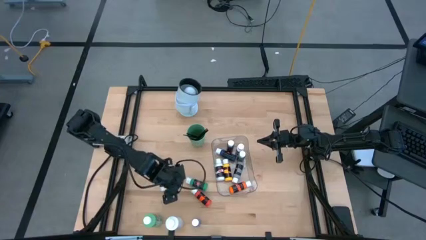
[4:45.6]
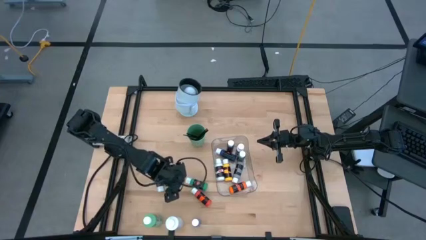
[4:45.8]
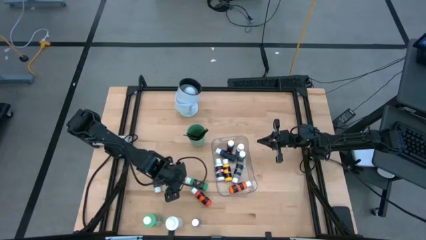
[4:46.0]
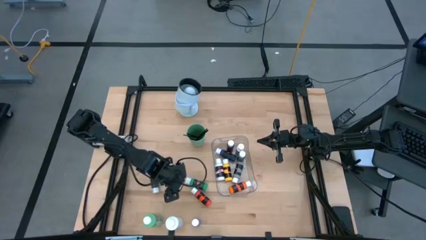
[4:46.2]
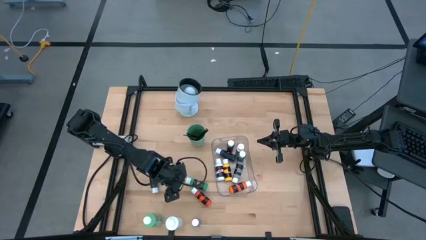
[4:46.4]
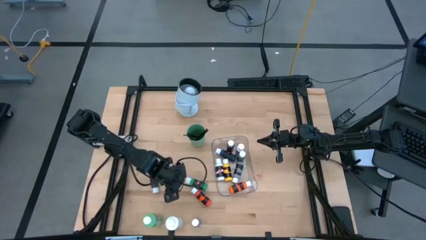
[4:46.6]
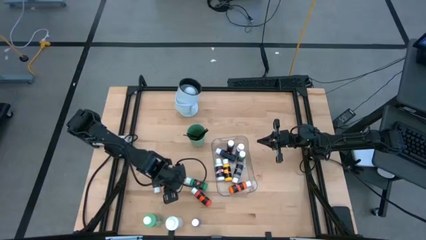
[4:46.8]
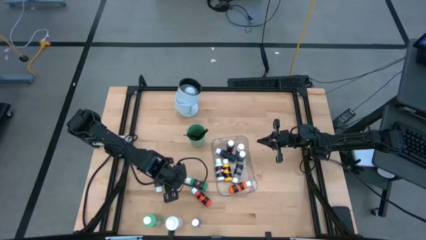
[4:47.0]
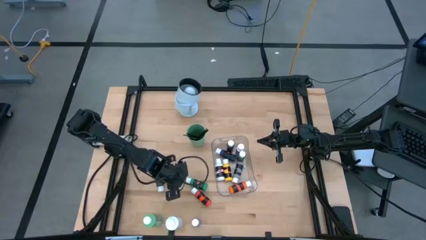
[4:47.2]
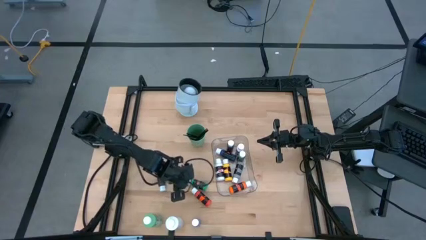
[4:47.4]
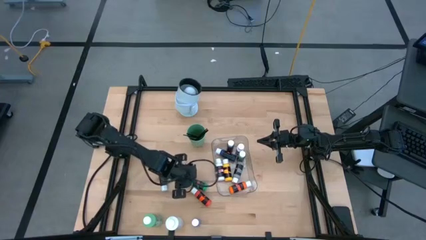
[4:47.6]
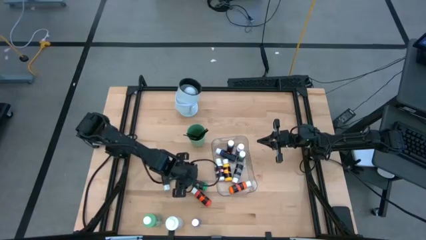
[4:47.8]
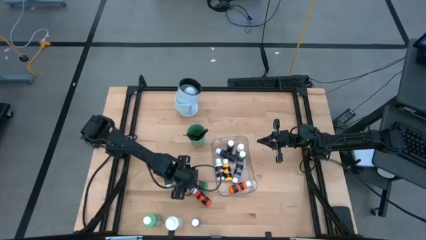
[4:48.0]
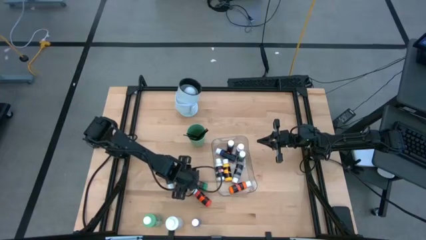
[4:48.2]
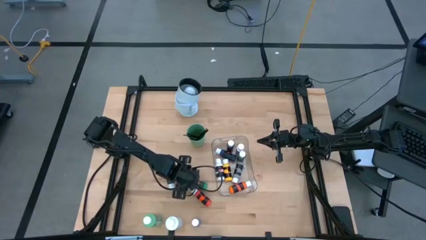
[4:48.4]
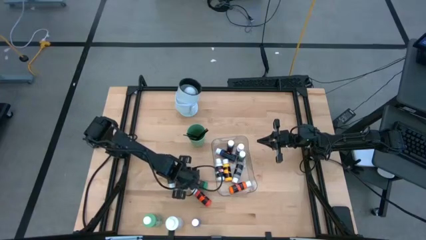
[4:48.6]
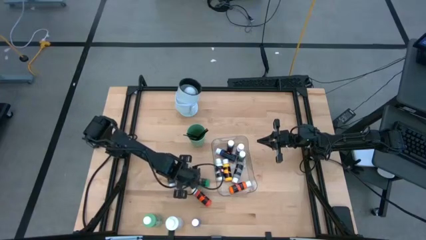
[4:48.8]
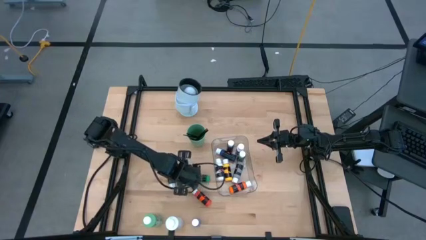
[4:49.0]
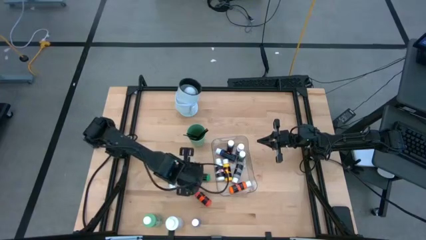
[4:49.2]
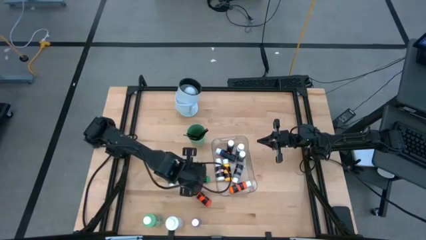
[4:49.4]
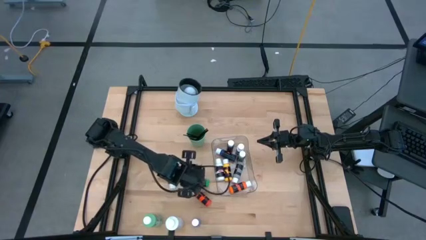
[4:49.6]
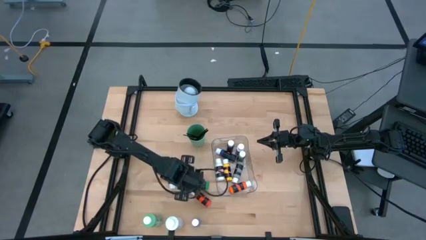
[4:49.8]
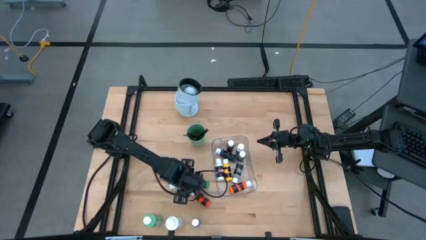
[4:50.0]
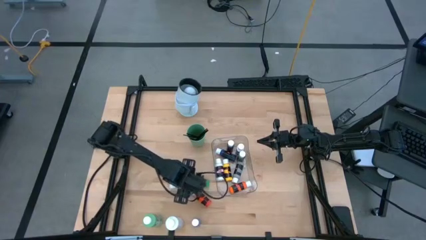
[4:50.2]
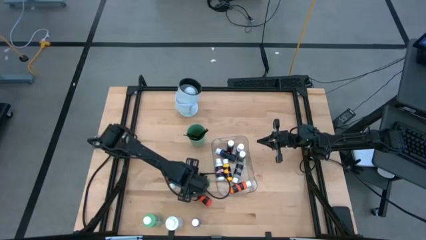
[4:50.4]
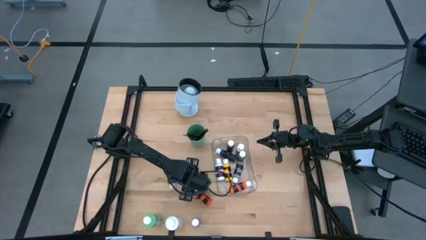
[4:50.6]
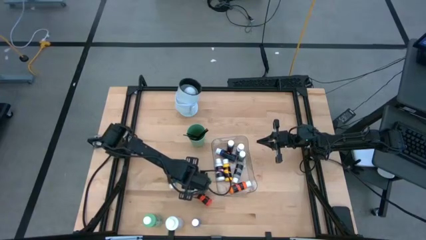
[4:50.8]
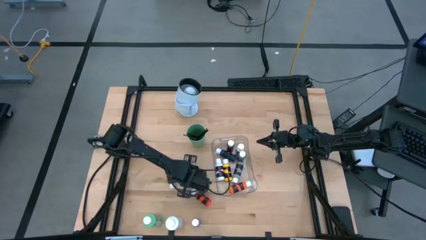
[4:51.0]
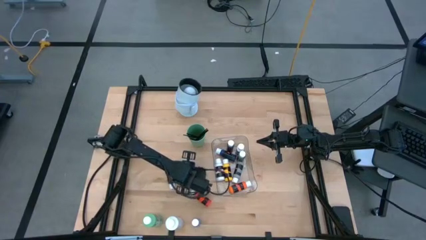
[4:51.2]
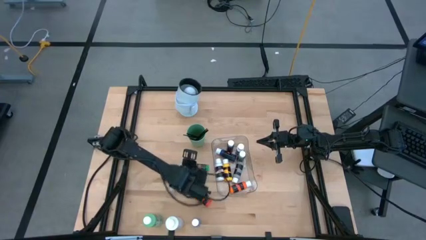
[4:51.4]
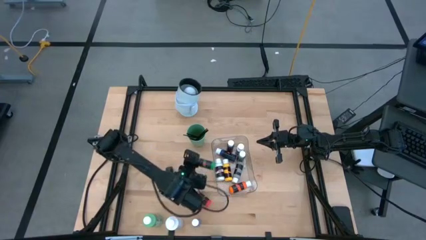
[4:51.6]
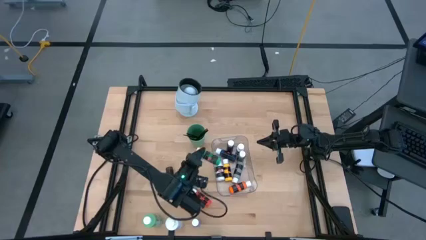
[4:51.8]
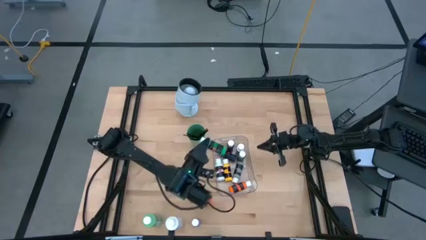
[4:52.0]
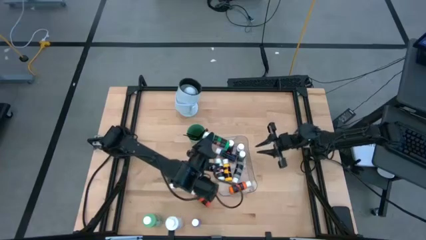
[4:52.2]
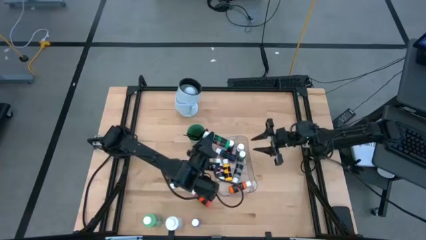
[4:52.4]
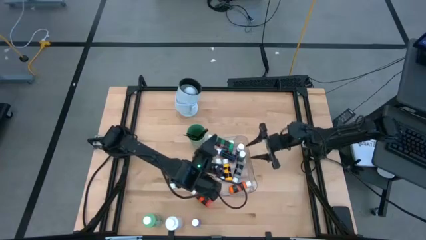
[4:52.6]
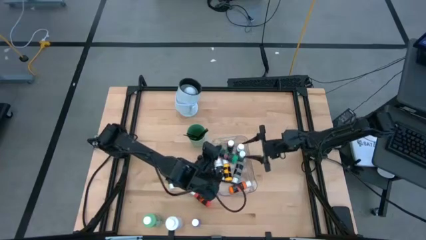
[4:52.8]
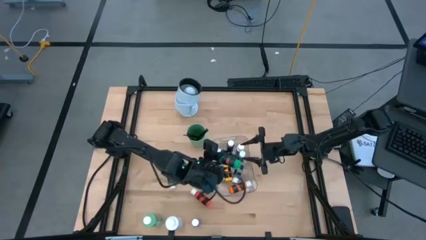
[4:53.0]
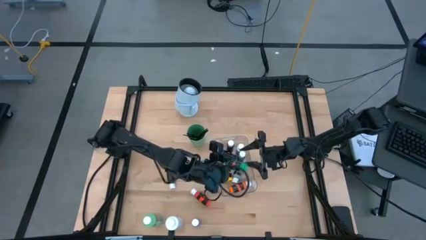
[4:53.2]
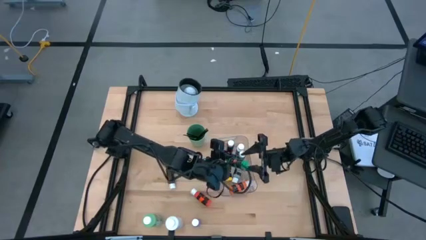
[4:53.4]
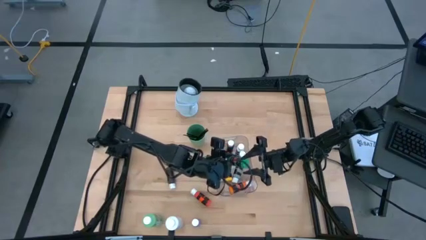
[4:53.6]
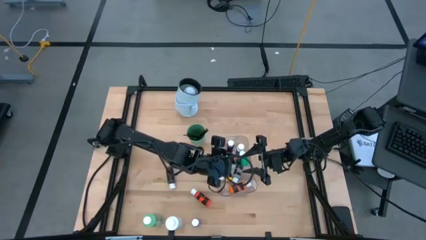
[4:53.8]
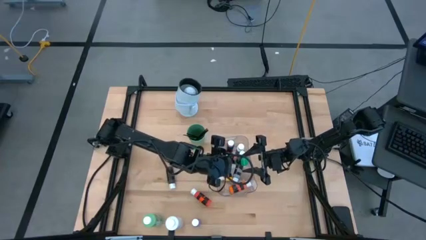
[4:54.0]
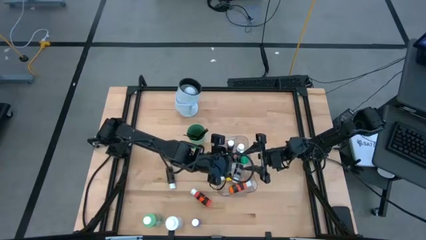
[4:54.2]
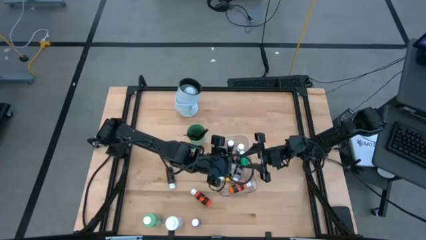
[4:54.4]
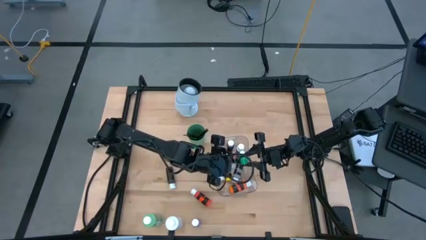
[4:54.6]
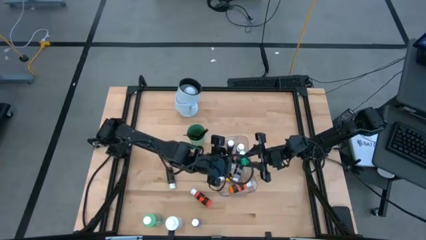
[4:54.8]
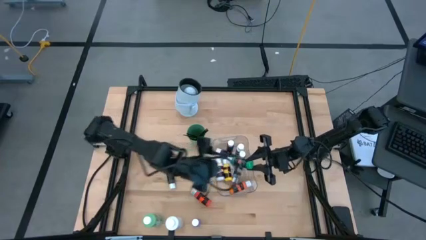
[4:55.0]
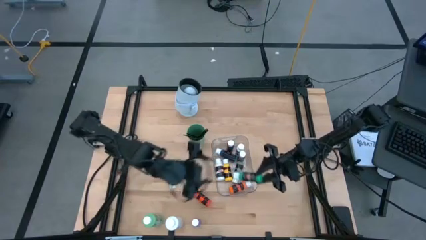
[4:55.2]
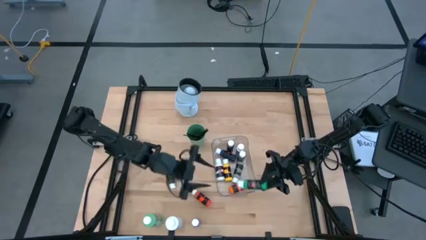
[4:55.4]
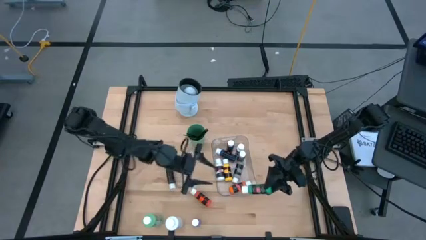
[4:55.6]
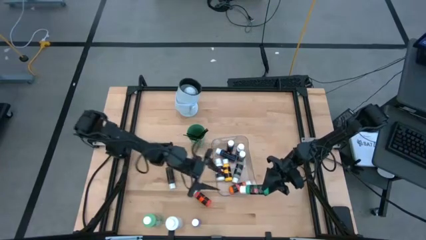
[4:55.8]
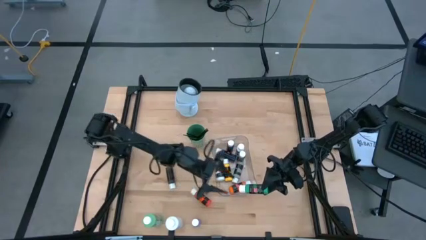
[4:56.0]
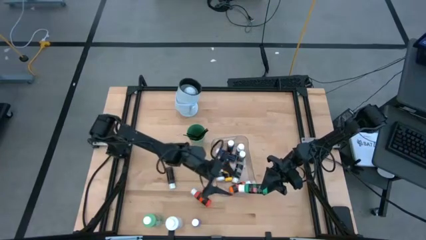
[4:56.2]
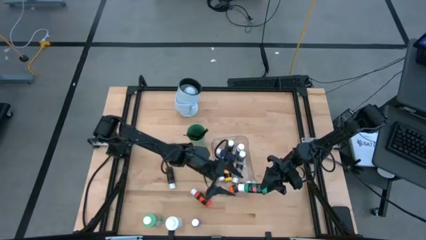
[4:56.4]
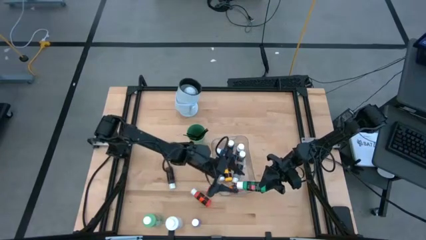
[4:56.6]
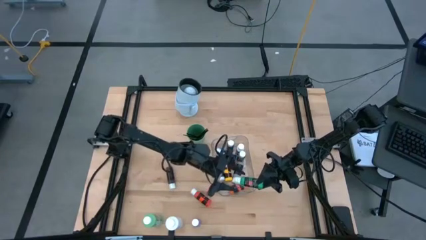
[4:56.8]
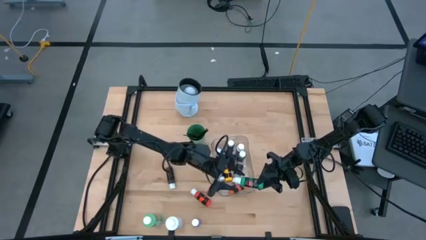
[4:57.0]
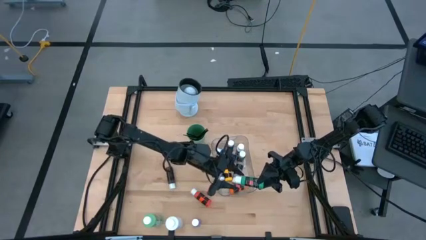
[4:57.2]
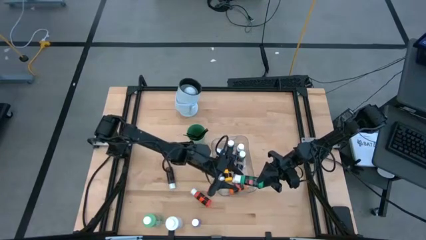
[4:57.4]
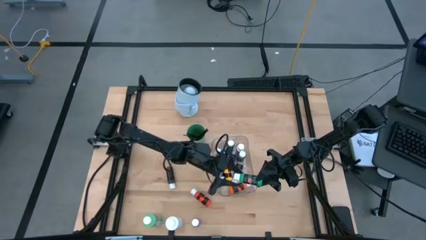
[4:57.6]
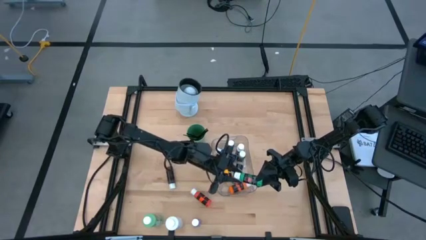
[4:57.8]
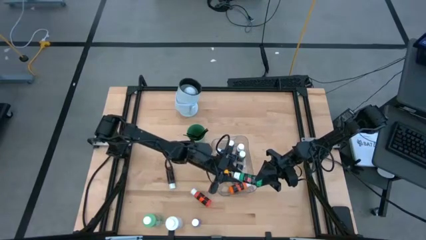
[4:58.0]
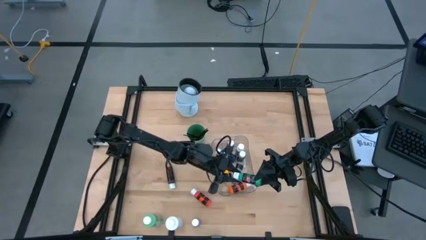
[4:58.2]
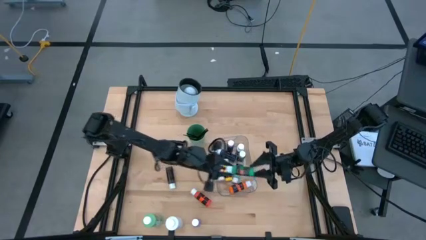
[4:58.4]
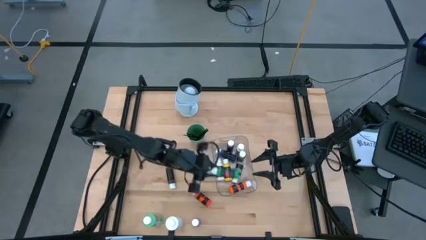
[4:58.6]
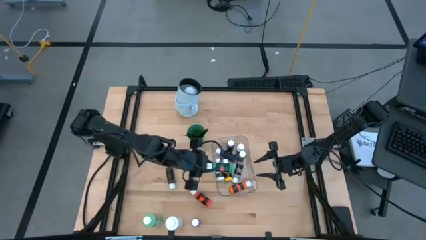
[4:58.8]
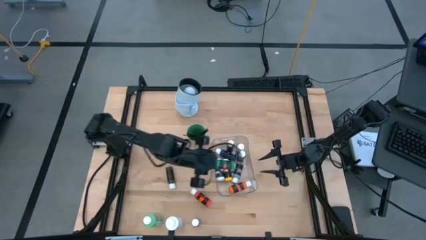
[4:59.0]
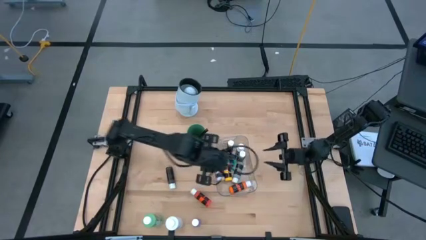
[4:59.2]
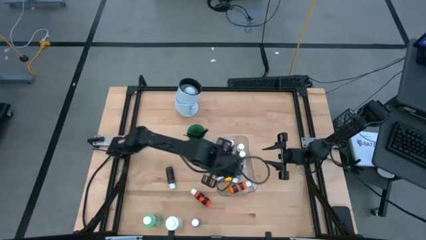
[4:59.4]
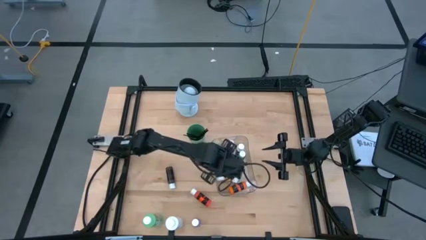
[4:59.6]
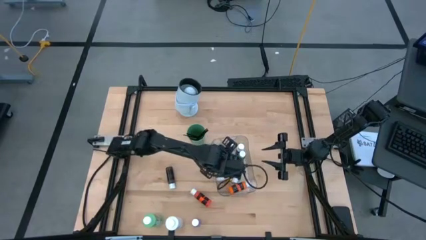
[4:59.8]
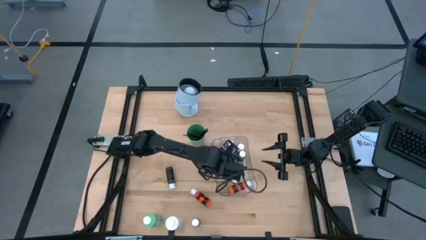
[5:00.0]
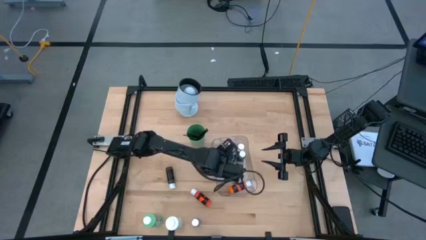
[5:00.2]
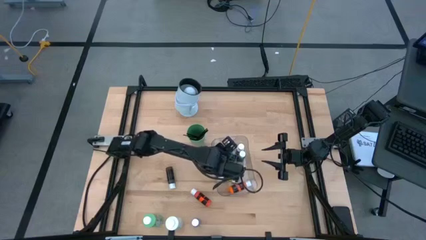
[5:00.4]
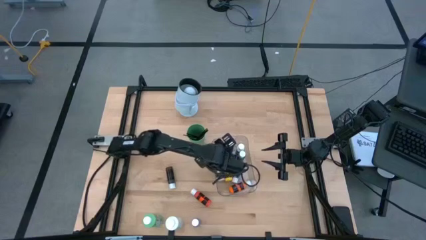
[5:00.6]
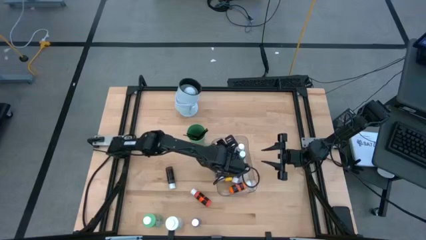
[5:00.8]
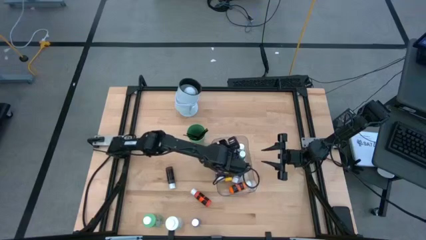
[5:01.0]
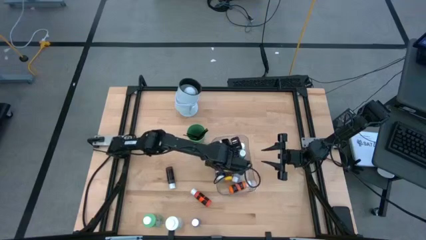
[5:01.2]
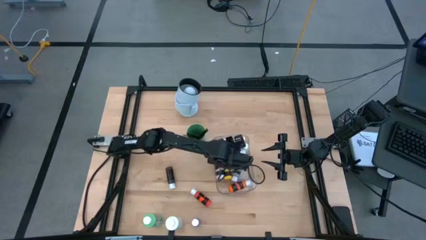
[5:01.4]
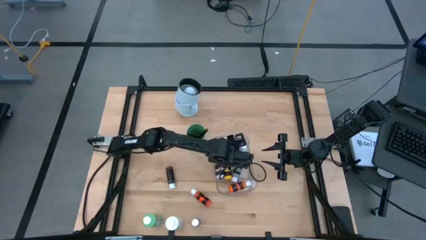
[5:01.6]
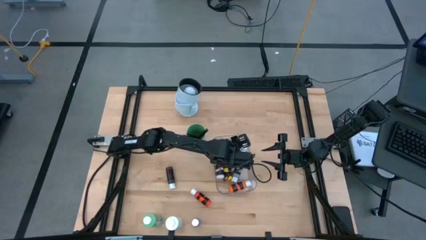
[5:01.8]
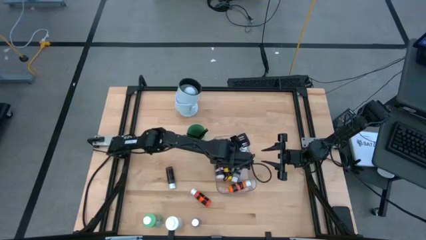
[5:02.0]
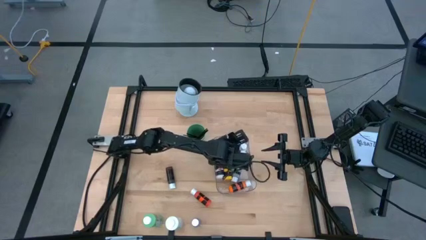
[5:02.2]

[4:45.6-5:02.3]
Task: Pick & Place Paint Supplies
Put the small green paint bottle into the transparent bin
